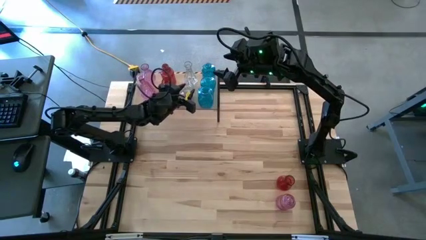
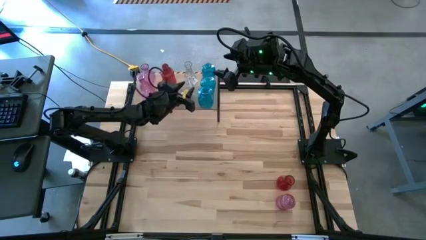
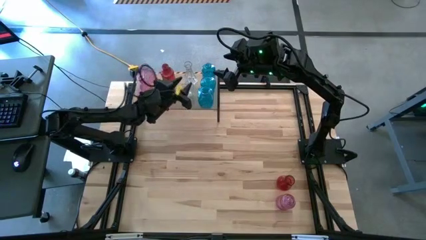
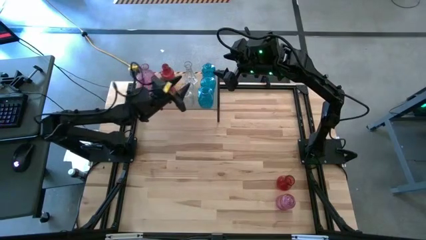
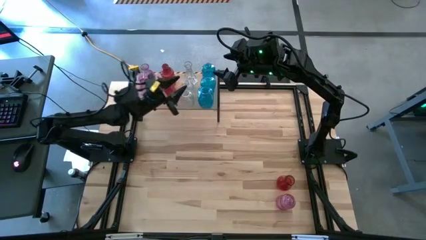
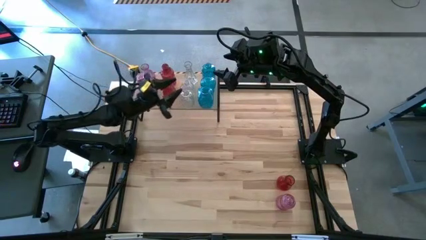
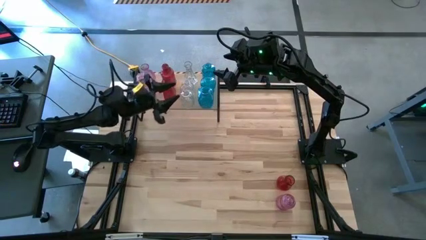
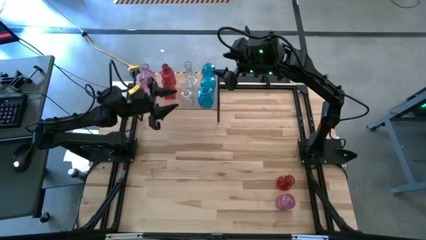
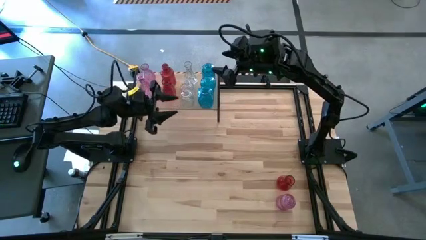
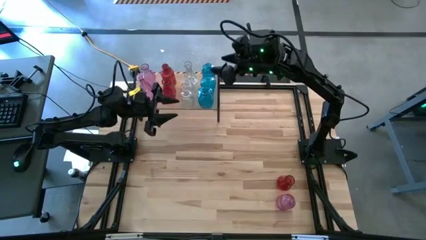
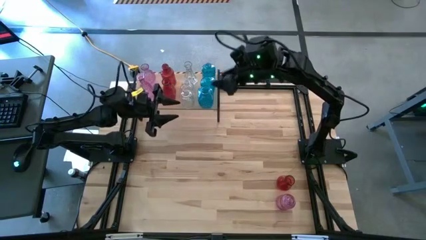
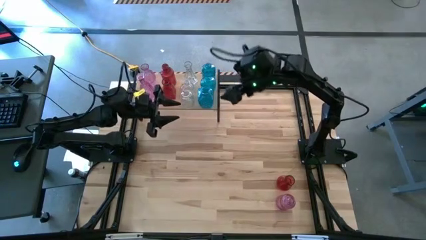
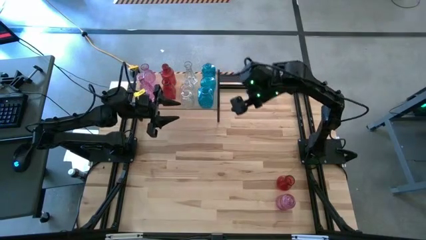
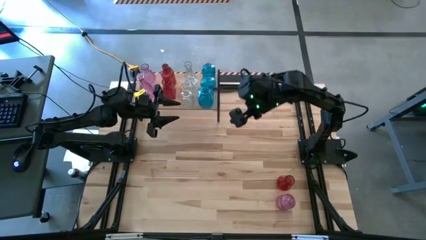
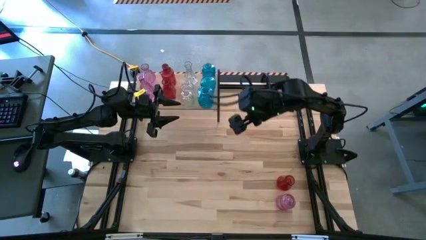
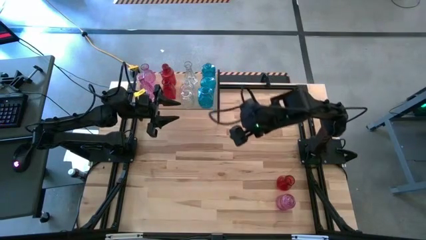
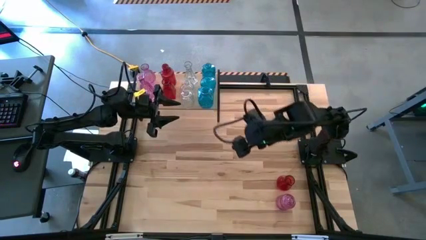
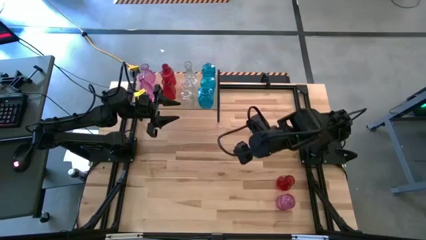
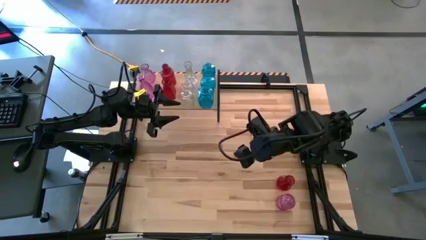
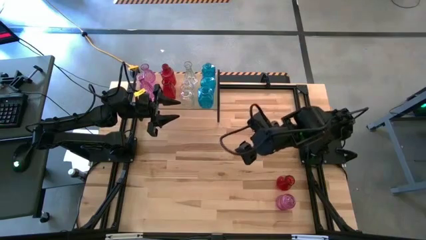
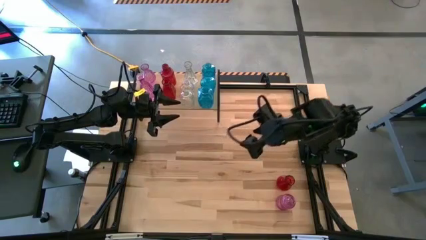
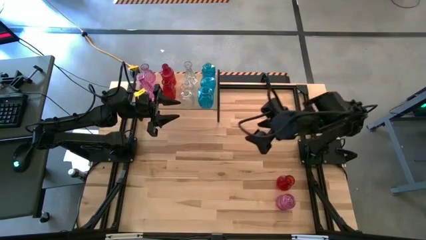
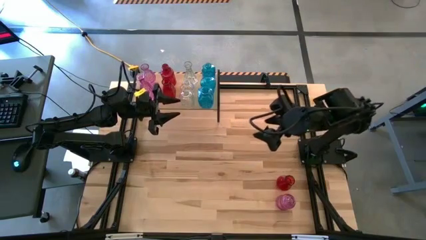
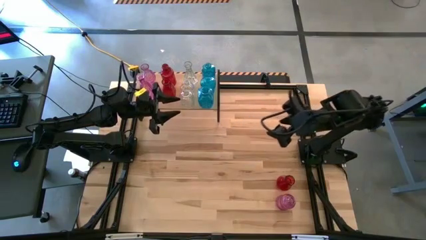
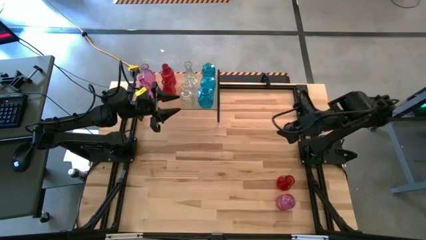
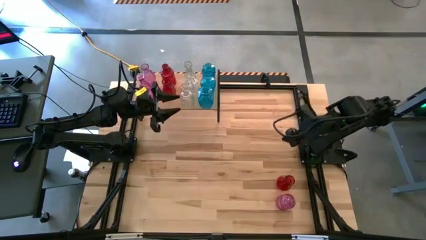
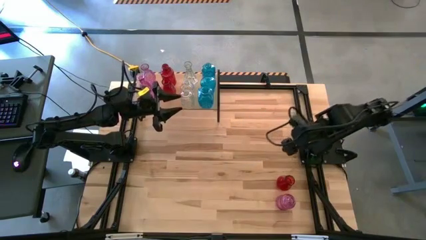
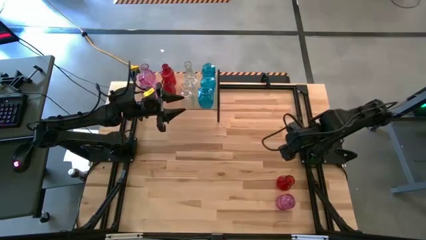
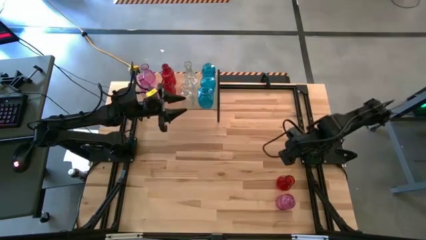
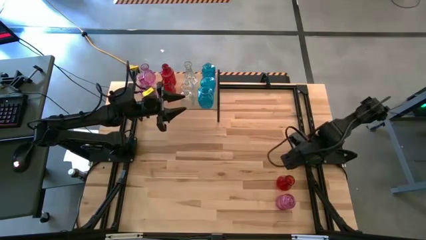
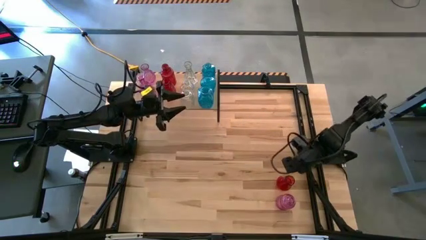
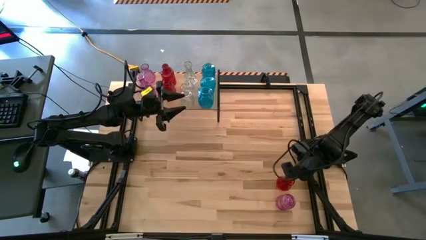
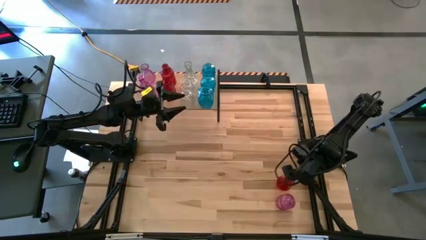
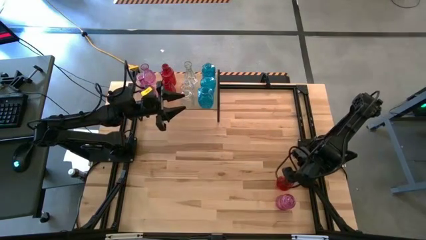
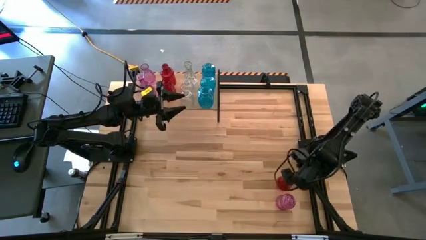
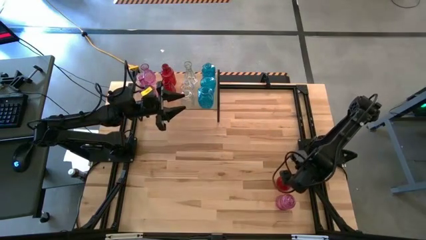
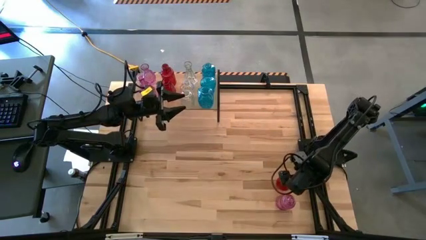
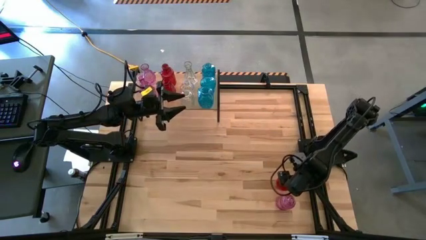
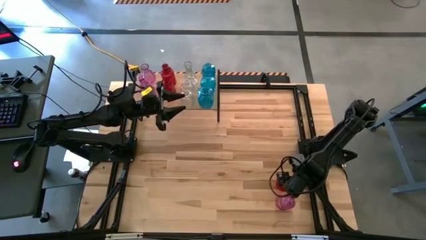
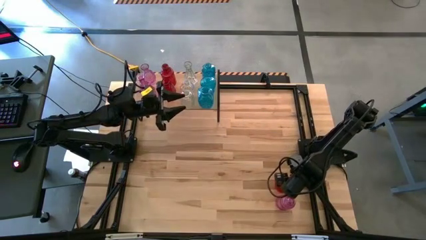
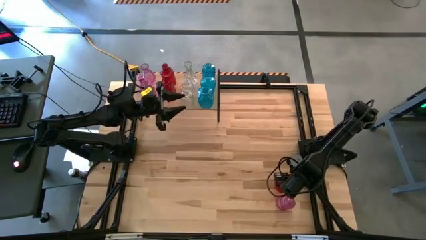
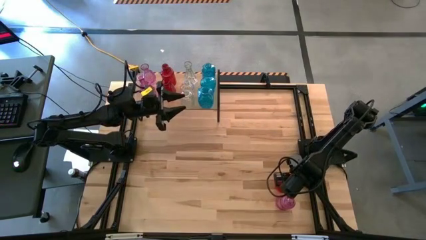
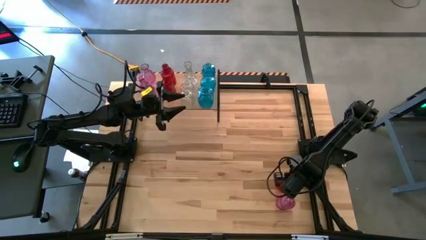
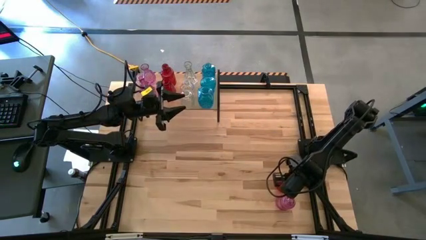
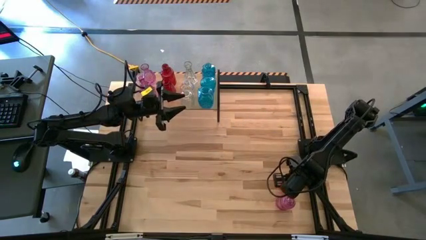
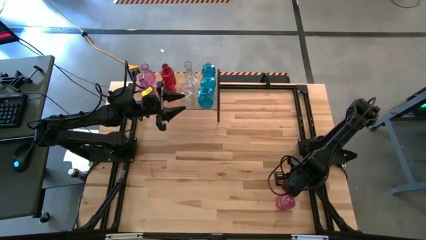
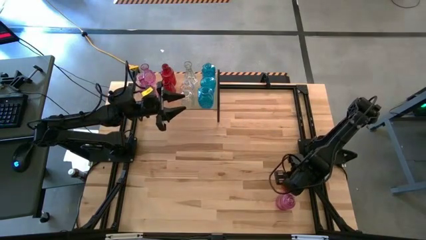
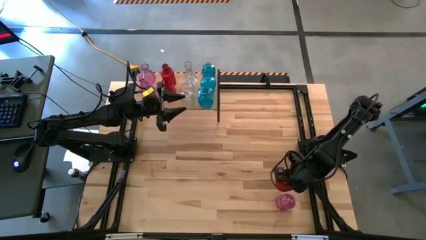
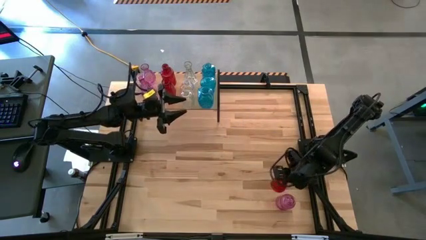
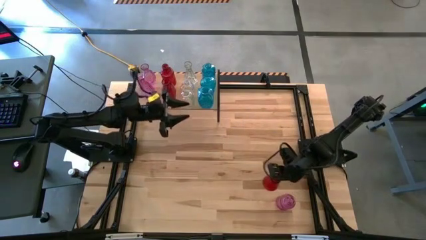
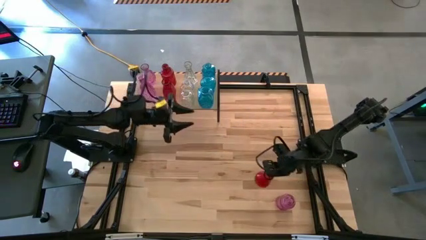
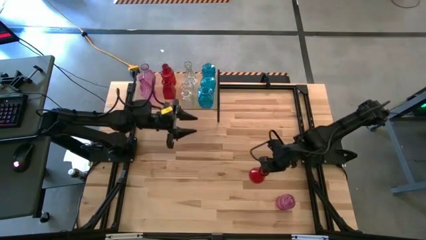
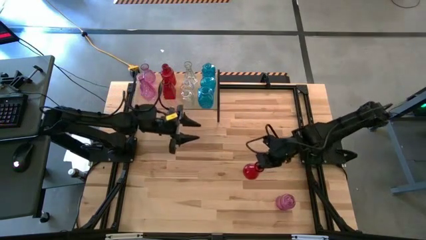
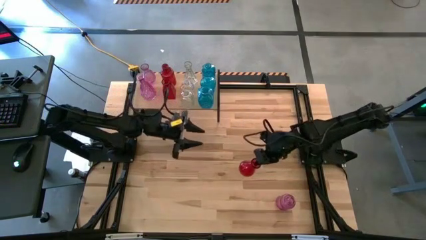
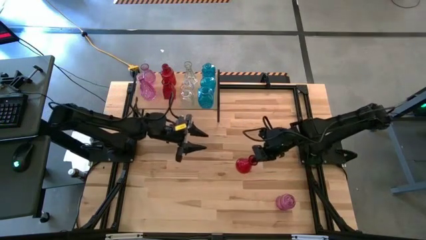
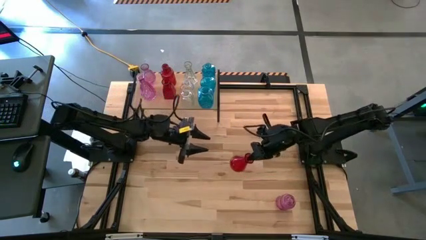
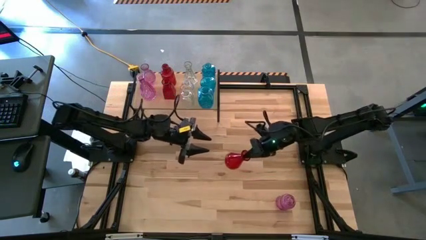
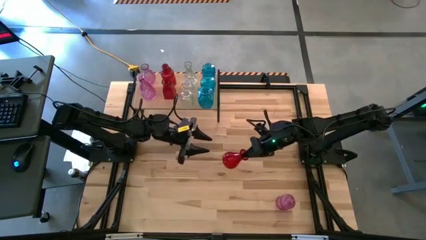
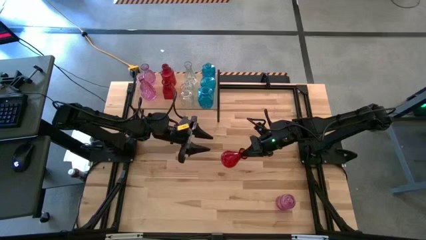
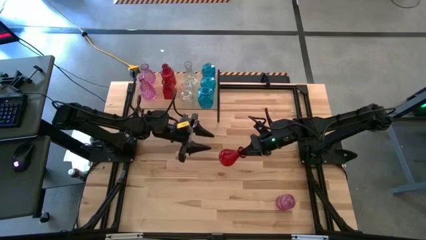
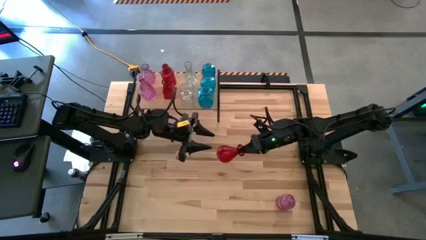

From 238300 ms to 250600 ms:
Task: sort vases onto shelf
Put the red vase on the shelf aligned with the other red vases

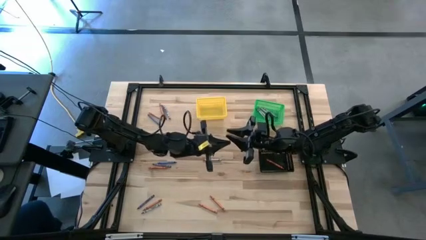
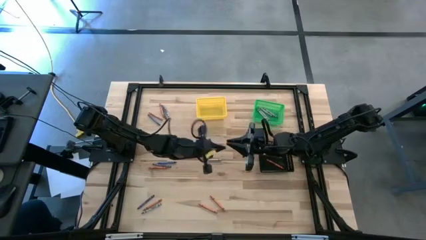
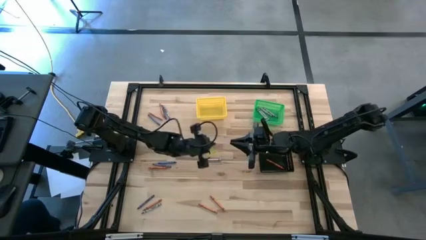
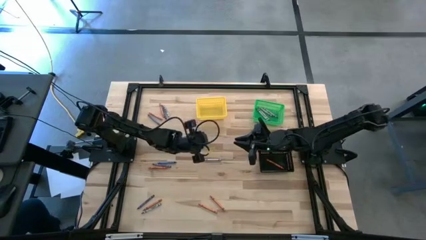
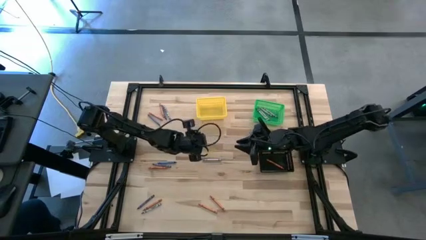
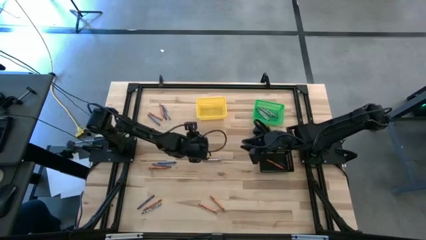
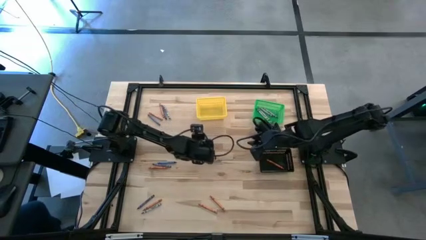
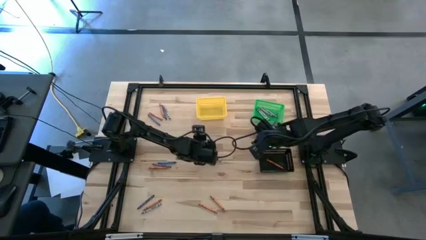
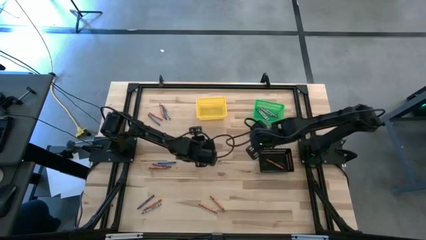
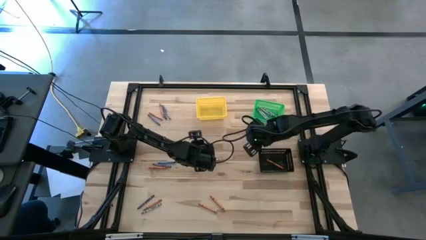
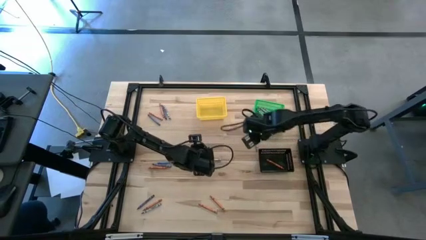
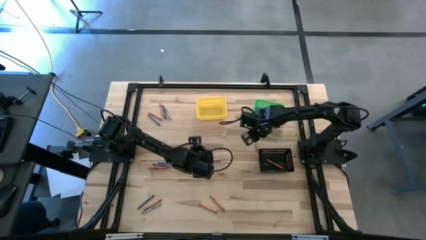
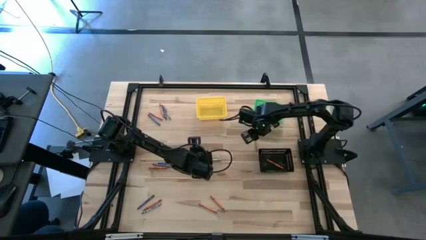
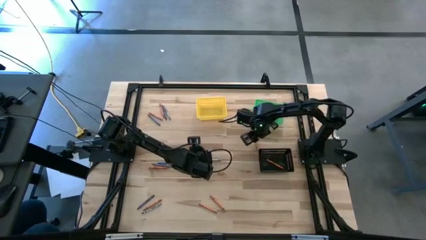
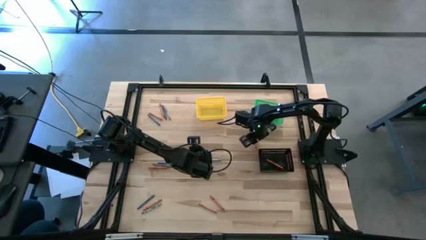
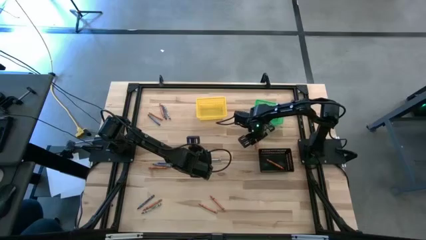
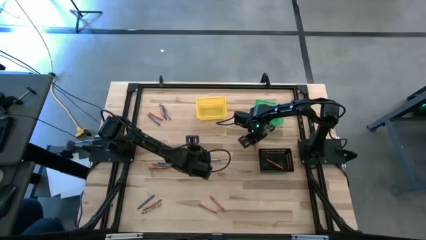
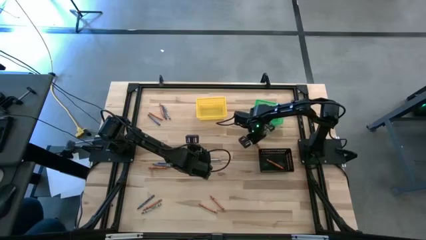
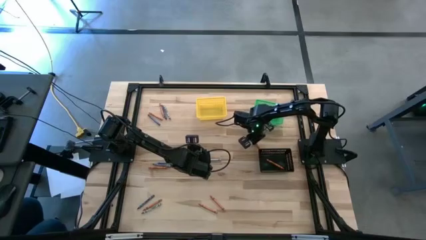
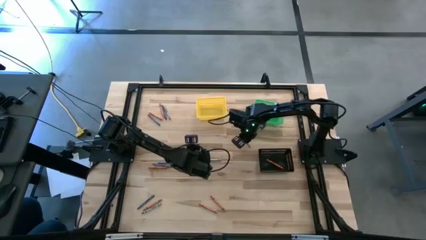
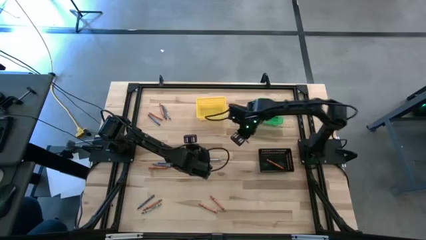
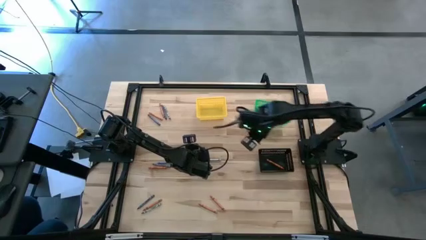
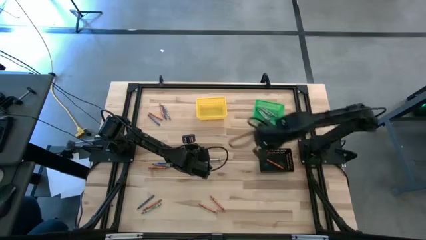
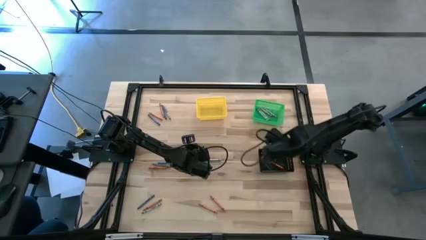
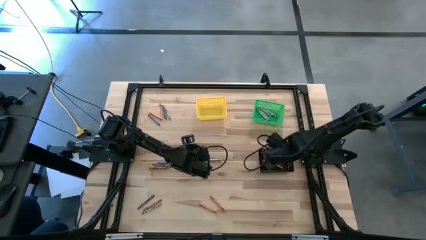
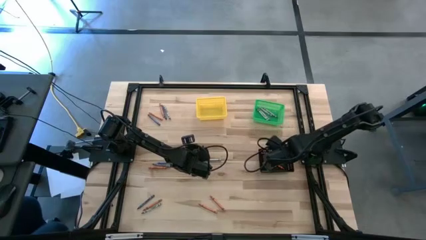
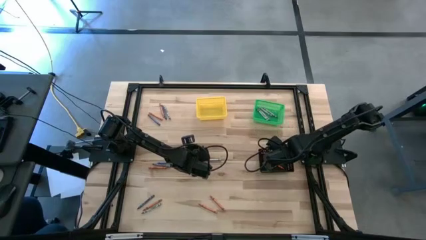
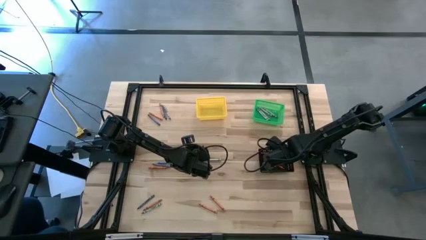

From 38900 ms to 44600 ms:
Task: Sort crayons
Put the orange crayon into the black basket
